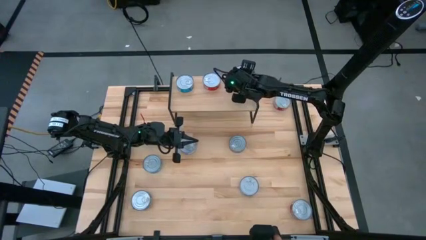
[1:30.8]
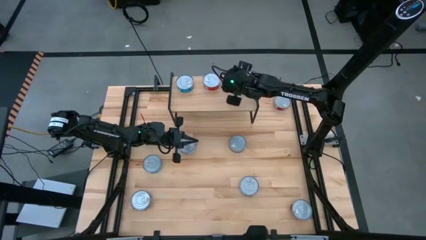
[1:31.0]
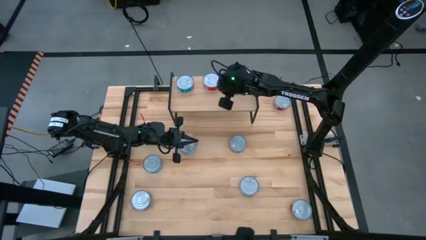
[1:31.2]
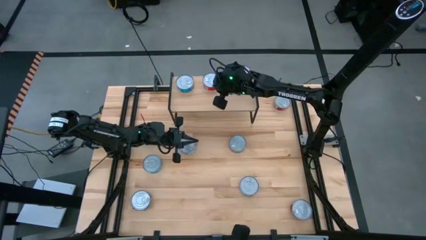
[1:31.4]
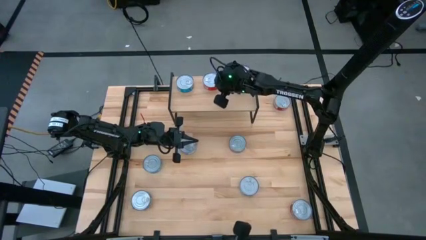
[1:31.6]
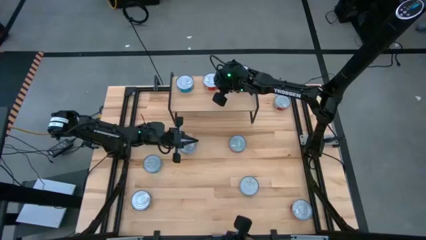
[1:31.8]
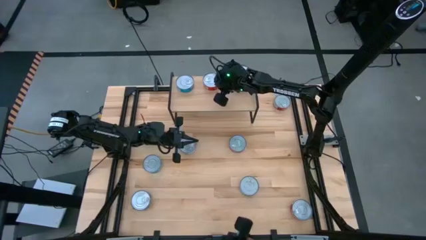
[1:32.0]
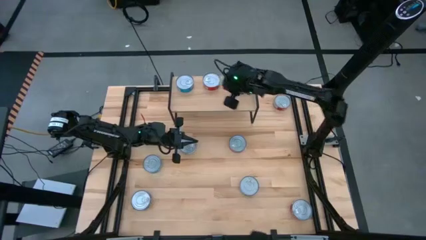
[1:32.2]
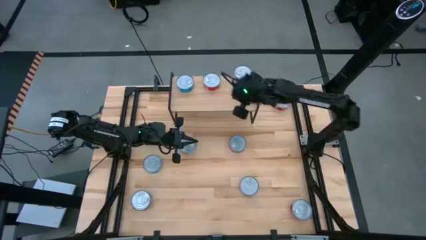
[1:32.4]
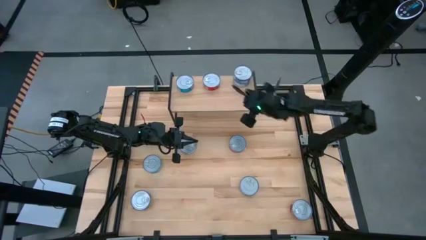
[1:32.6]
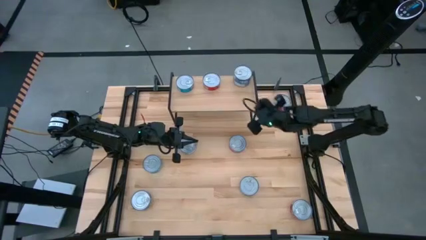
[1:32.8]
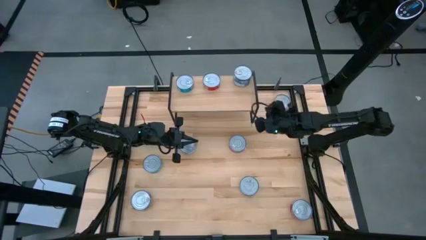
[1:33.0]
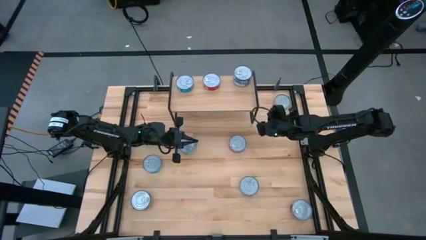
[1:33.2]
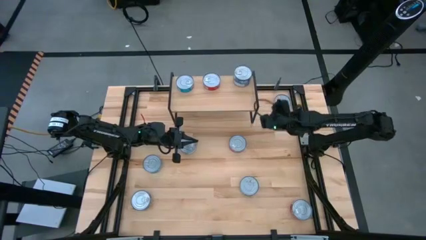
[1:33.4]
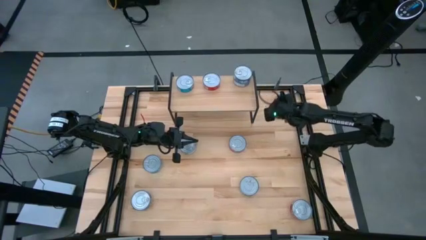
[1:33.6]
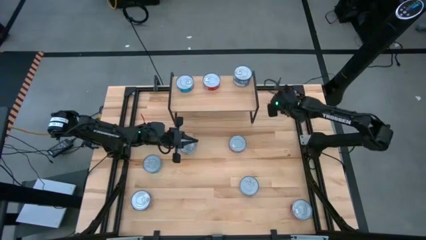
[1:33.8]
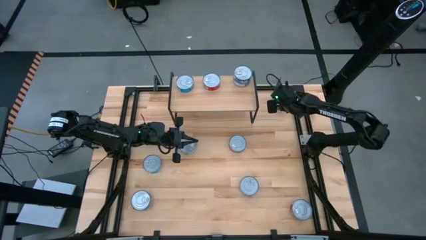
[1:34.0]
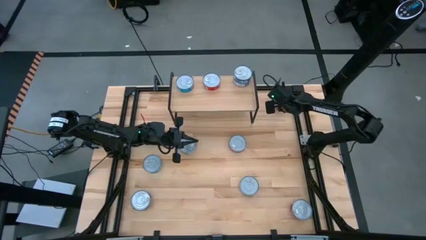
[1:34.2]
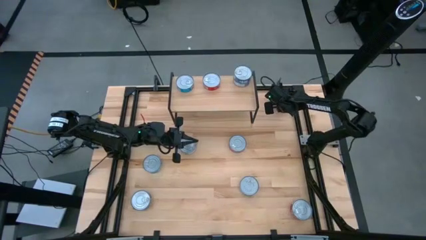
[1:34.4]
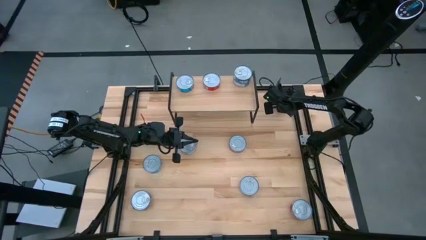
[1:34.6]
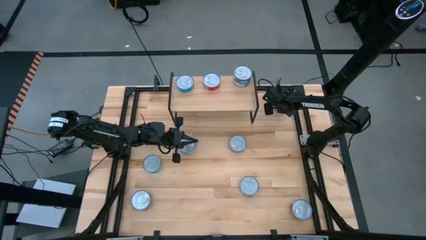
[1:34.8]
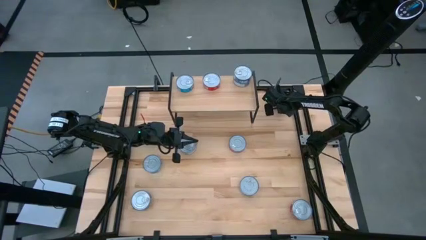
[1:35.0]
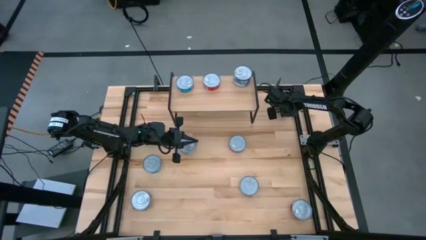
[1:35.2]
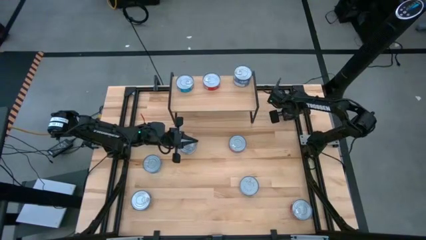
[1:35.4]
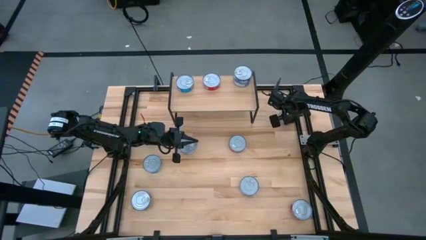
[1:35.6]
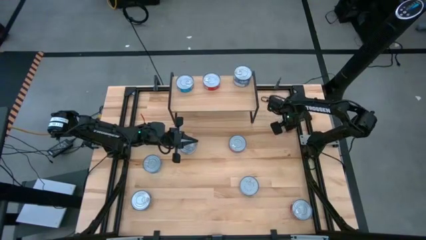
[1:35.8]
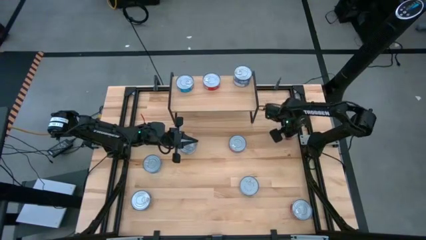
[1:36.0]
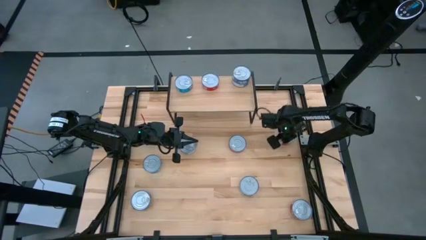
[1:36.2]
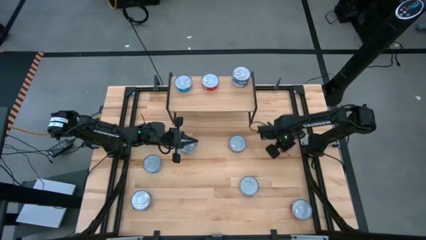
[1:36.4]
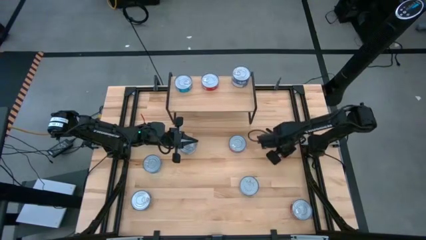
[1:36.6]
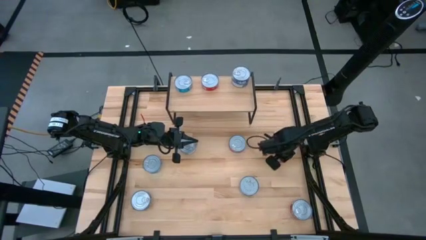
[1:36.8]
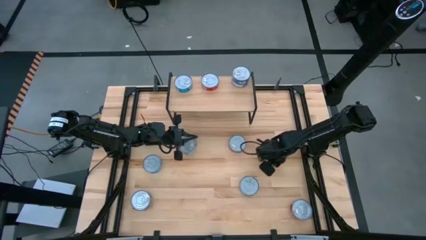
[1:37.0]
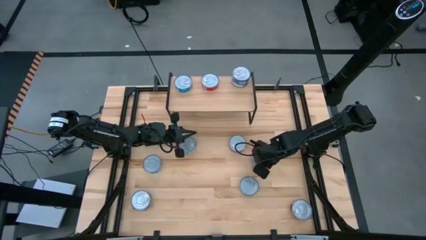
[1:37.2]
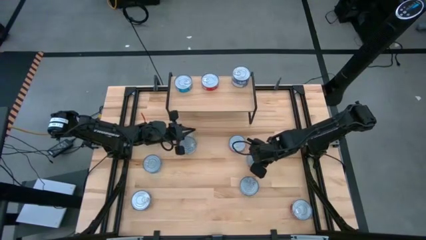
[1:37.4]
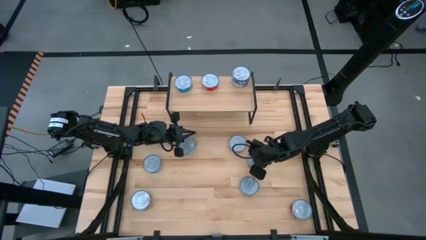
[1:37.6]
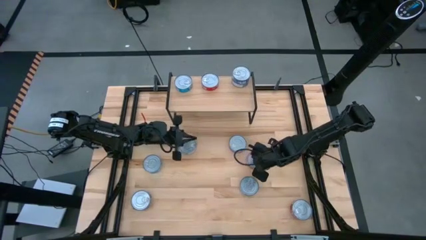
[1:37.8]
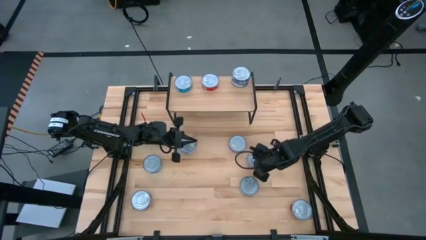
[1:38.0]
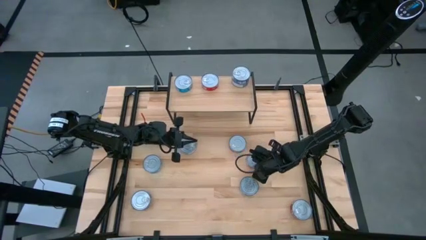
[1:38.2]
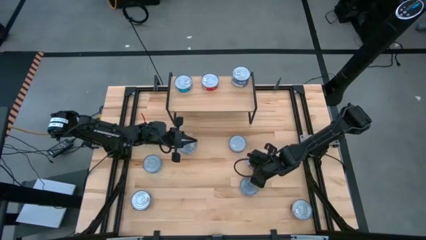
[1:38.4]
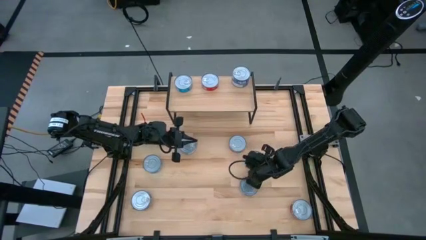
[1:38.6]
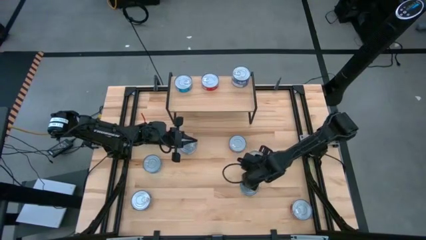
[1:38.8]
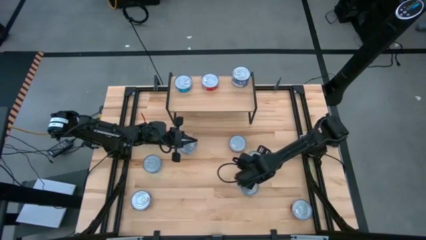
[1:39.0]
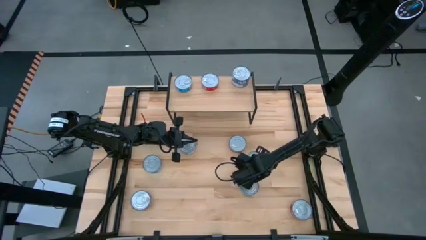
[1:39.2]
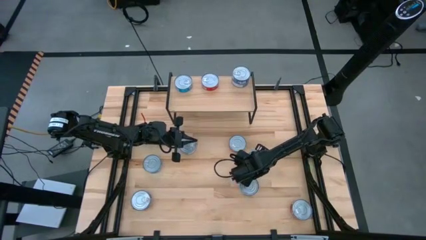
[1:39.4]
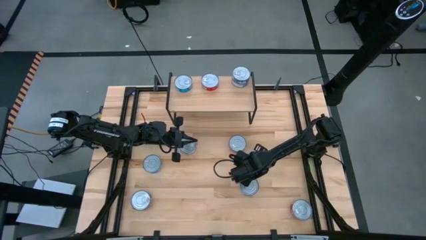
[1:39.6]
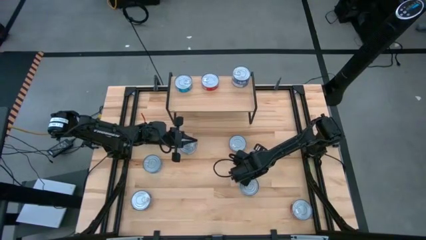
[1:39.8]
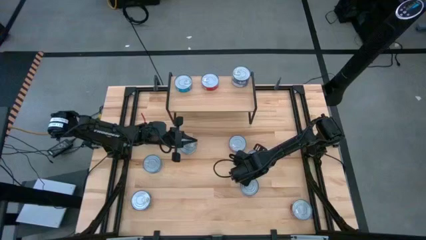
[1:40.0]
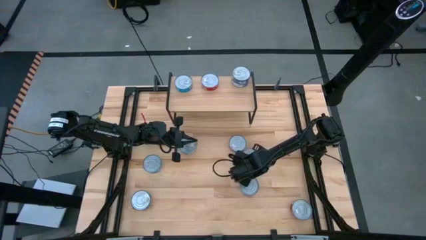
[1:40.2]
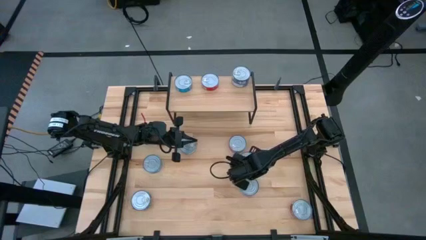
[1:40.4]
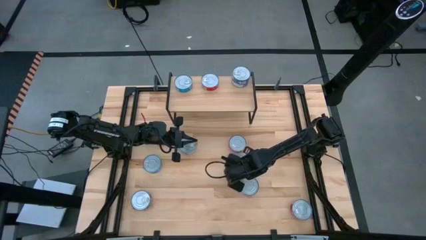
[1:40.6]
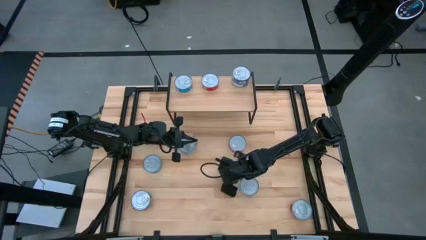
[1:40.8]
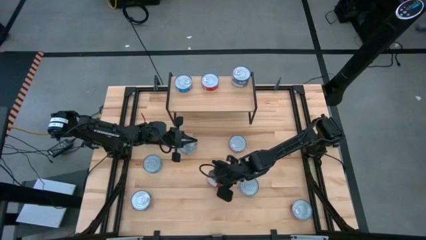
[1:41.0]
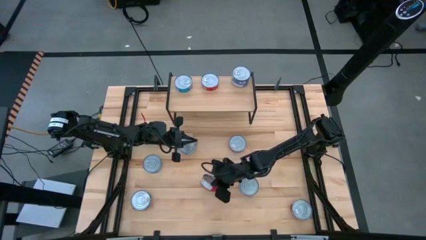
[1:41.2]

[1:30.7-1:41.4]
Task: Stack canned seafood by type on shelf
Stack the red tuna can on top of the other red tuna can on the shelf

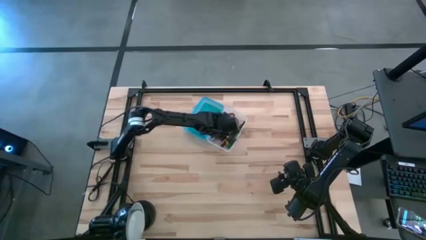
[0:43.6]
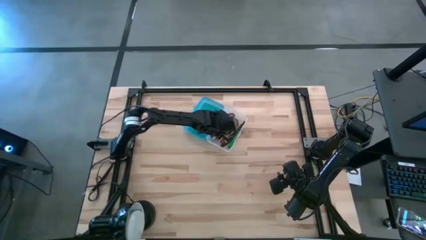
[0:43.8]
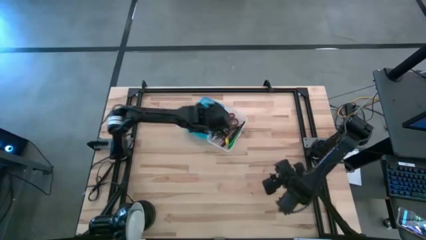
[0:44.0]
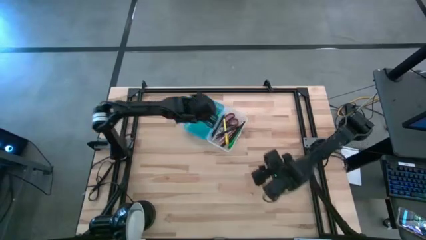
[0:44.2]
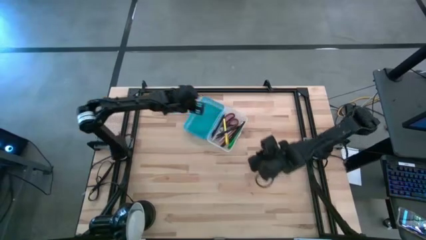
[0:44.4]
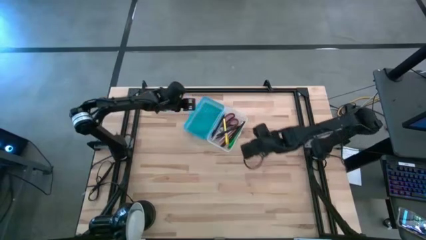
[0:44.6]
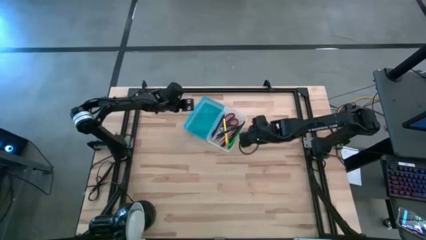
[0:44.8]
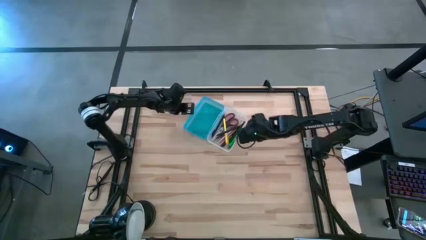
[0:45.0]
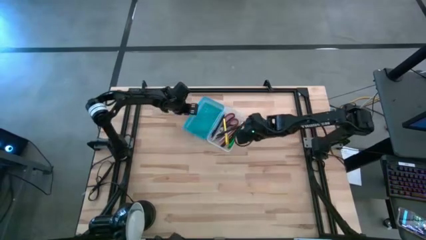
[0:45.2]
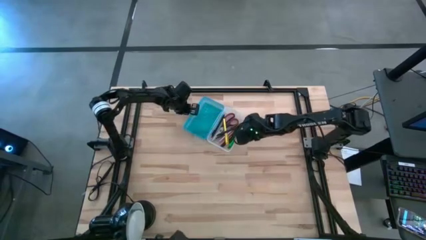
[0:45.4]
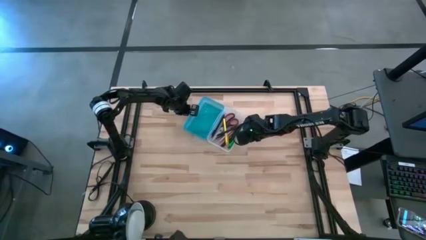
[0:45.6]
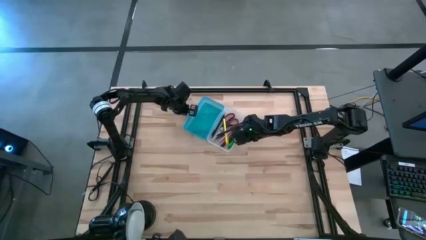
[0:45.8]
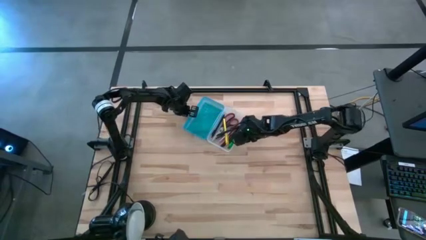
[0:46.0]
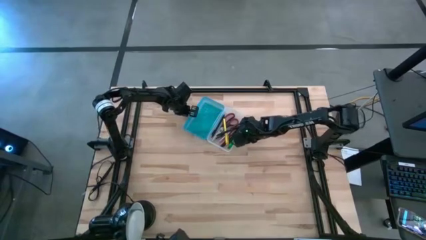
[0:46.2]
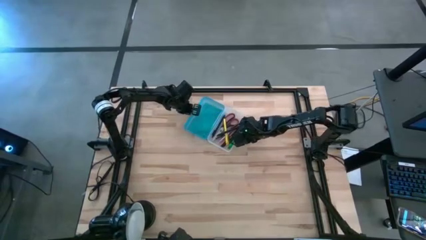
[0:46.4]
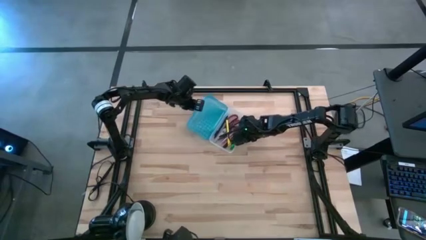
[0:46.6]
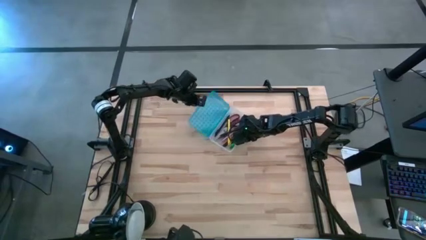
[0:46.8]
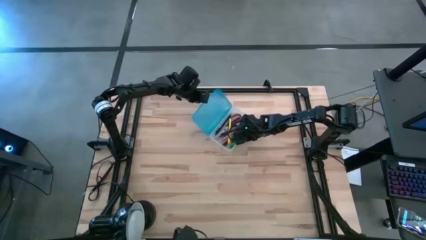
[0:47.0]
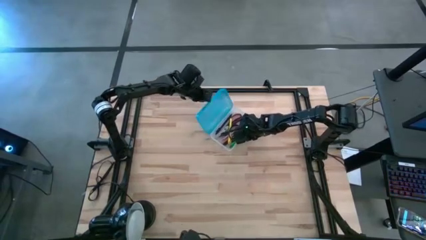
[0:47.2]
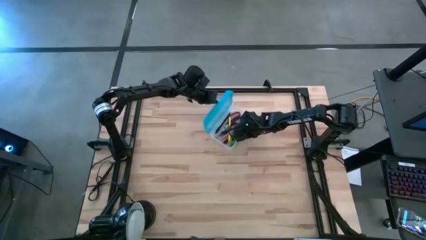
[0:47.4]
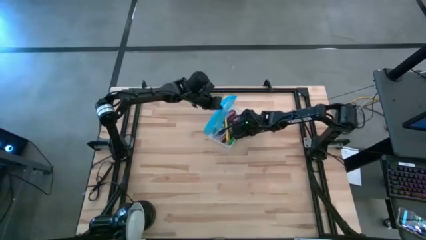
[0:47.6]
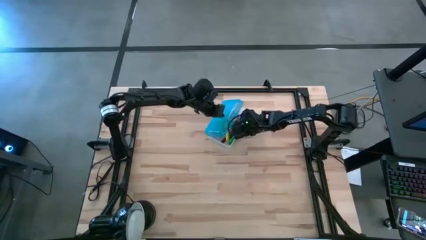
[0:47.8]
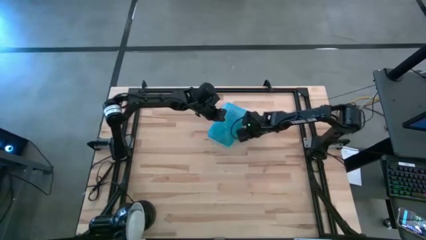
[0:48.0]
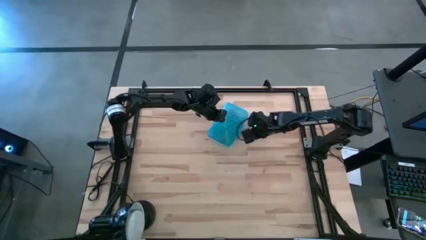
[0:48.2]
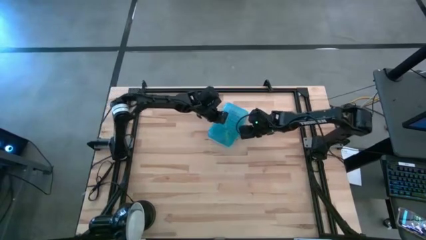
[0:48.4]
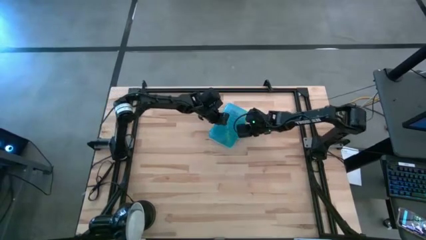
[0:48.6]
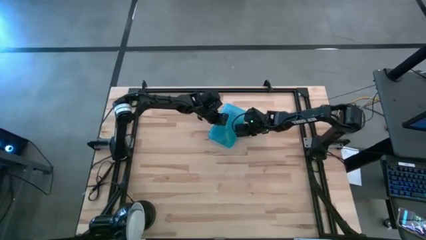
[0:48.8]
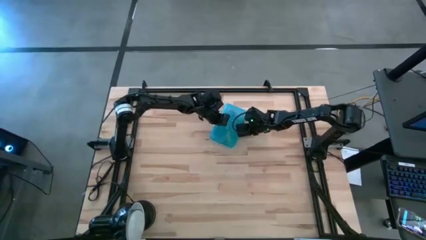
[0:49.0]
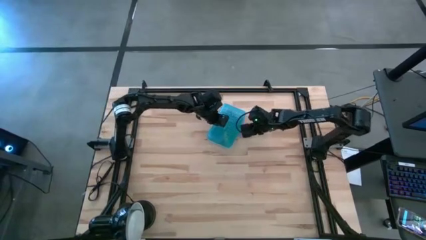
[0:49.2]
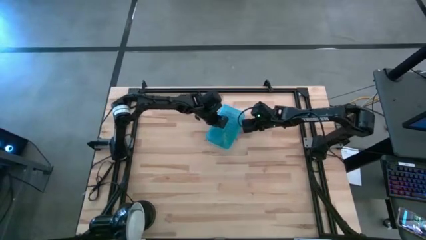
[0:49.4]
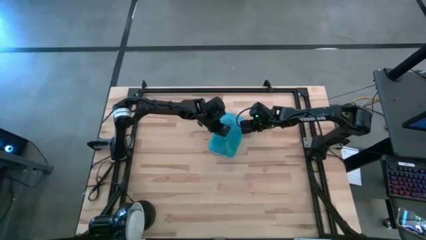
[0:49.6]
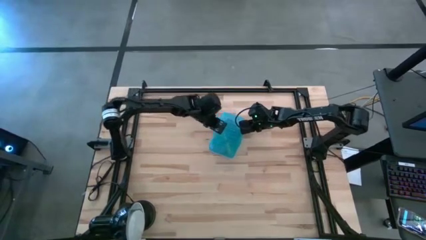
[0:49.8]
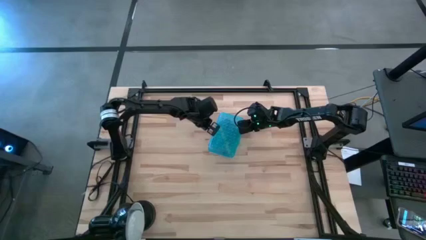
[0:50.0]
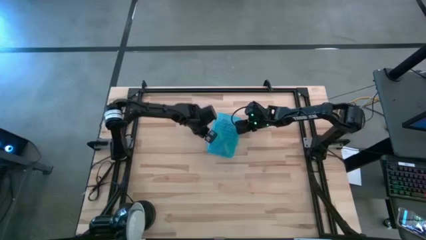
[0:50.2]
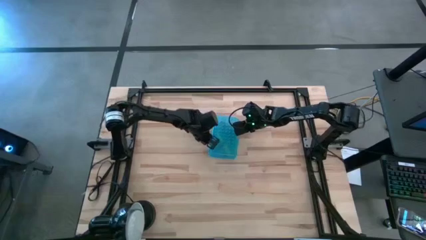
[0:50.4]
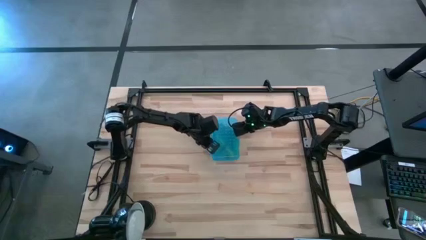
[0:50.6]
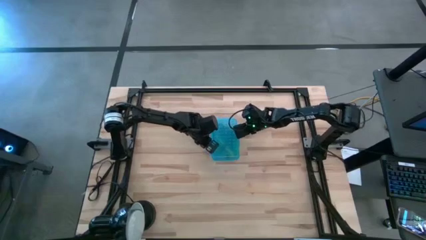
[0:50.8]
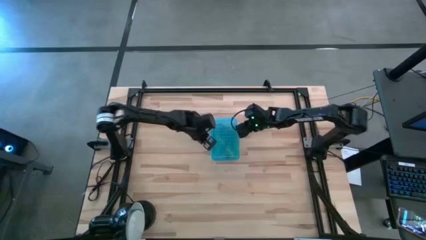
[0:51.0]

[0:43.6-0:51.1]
Task: Pick & place school supplies into a supply box
Close the blue supply box
